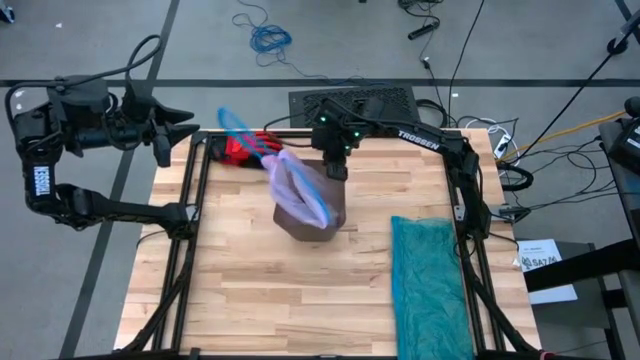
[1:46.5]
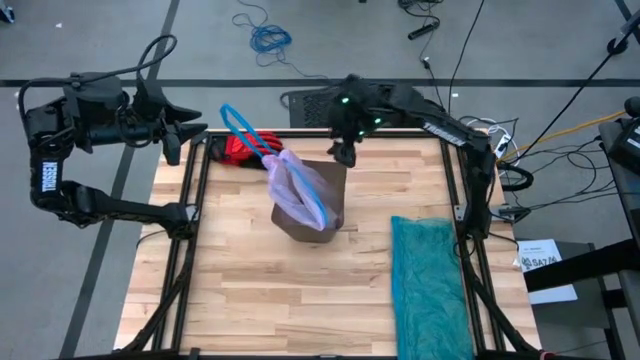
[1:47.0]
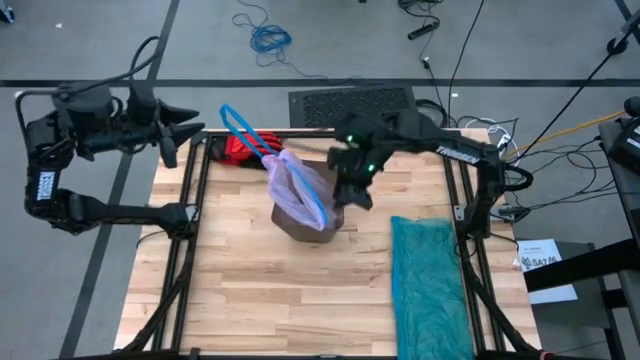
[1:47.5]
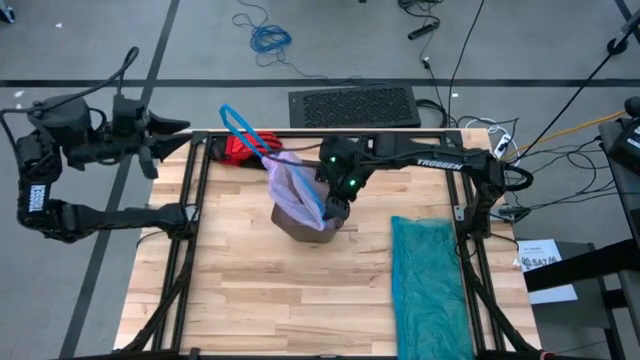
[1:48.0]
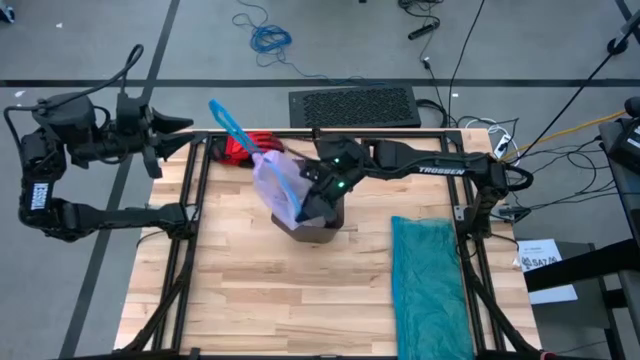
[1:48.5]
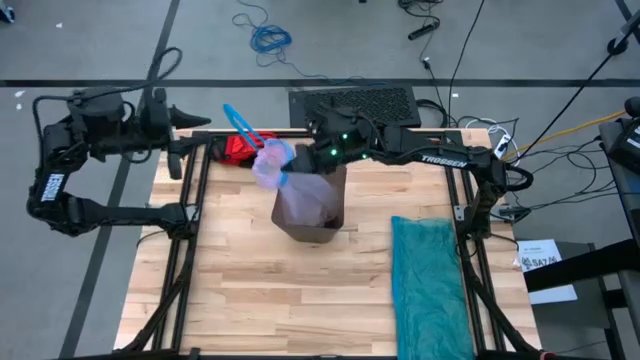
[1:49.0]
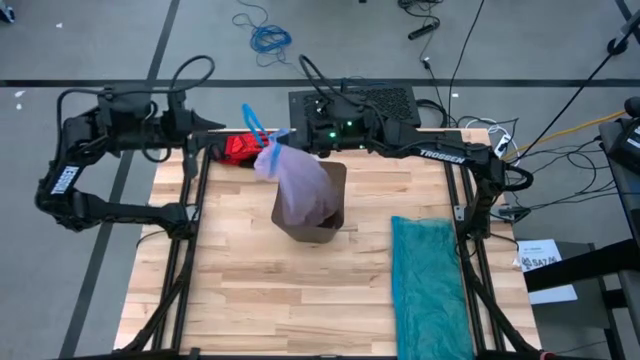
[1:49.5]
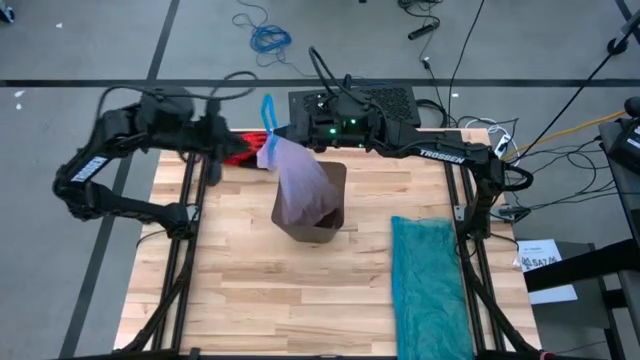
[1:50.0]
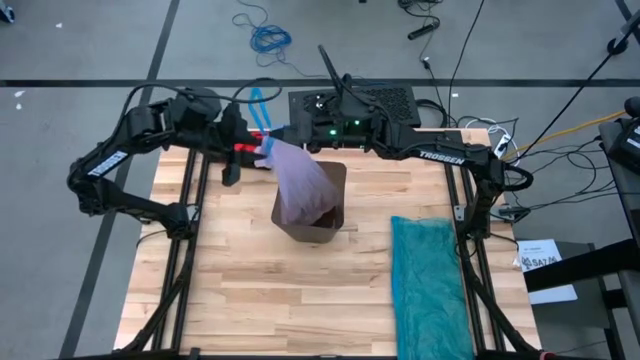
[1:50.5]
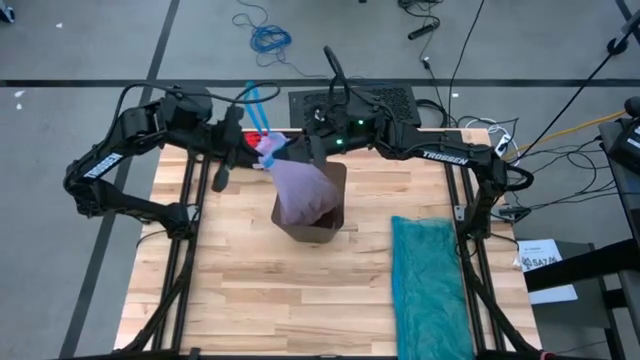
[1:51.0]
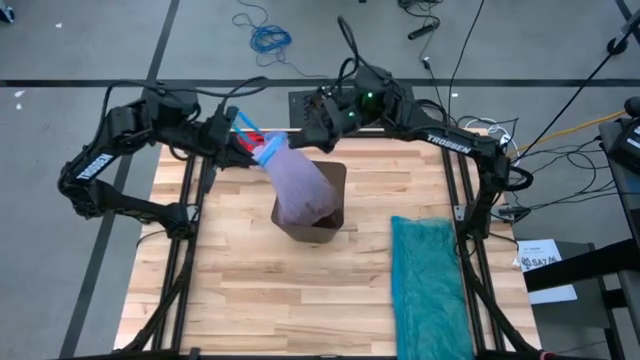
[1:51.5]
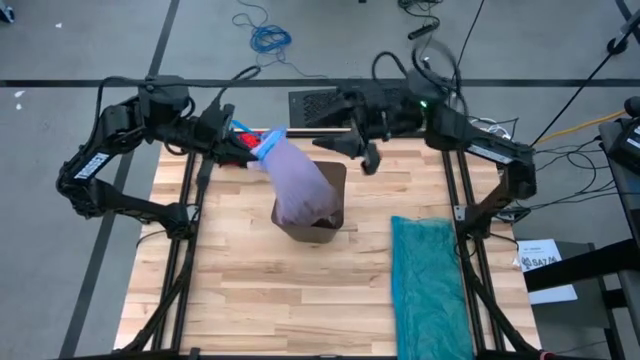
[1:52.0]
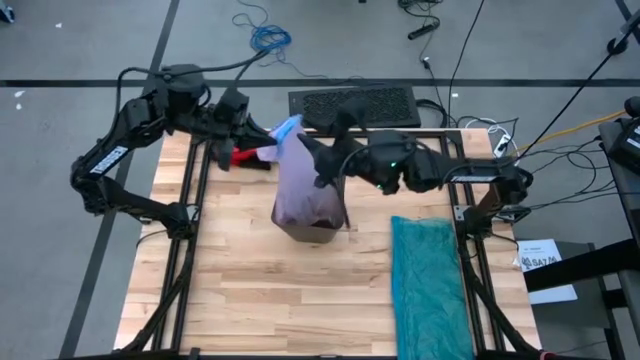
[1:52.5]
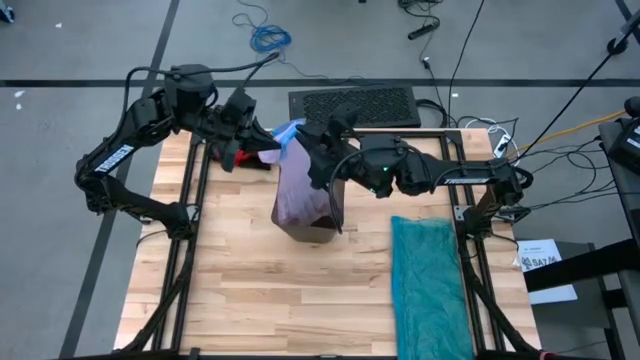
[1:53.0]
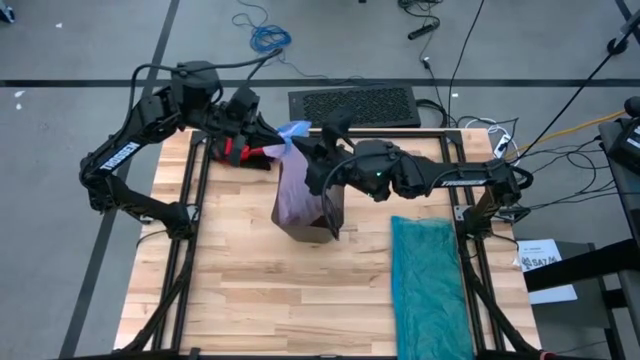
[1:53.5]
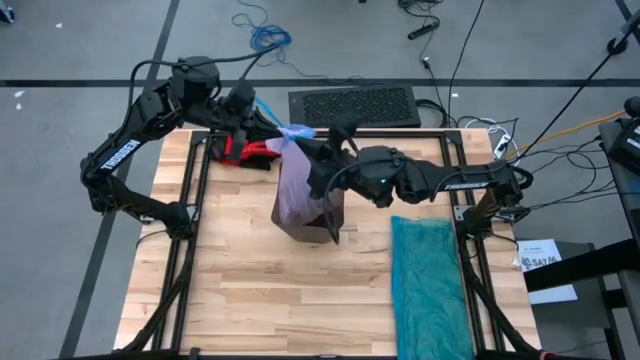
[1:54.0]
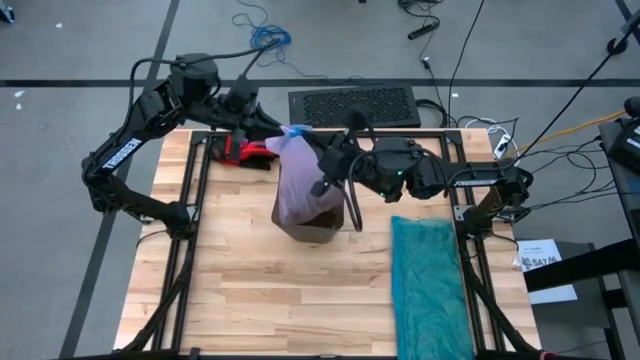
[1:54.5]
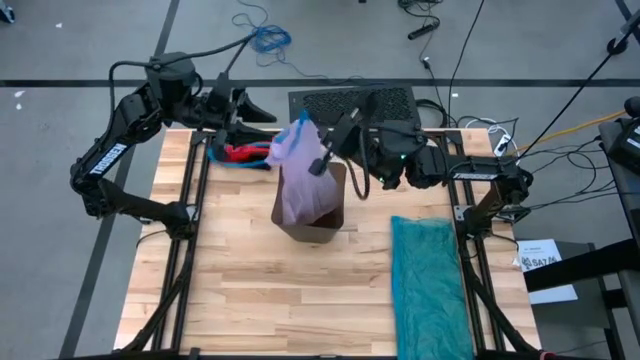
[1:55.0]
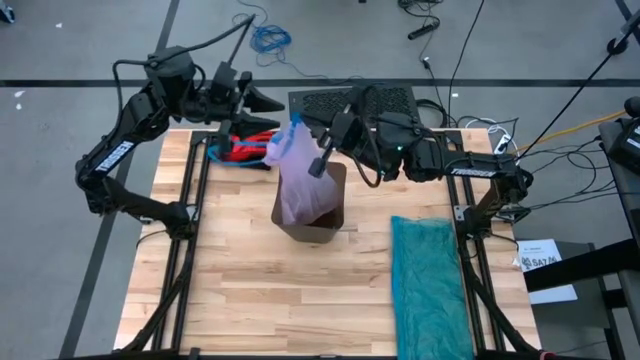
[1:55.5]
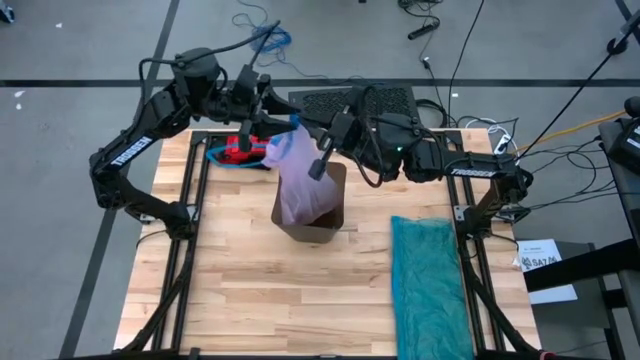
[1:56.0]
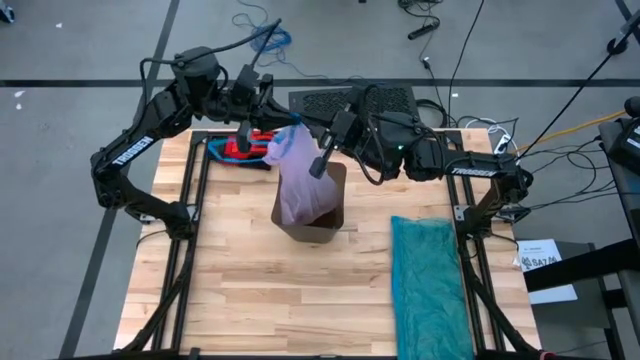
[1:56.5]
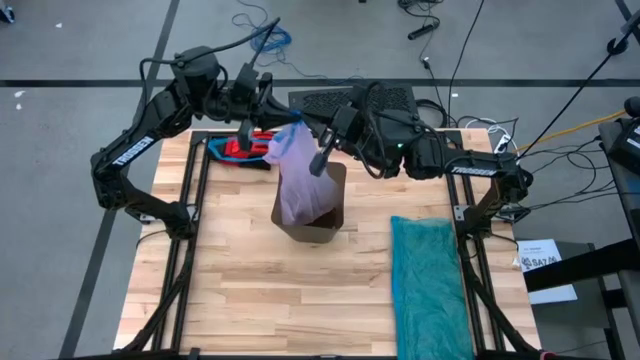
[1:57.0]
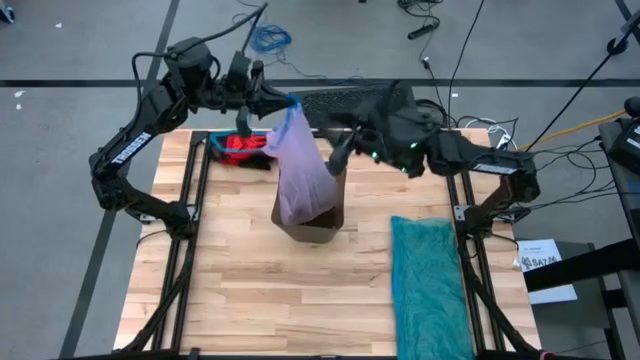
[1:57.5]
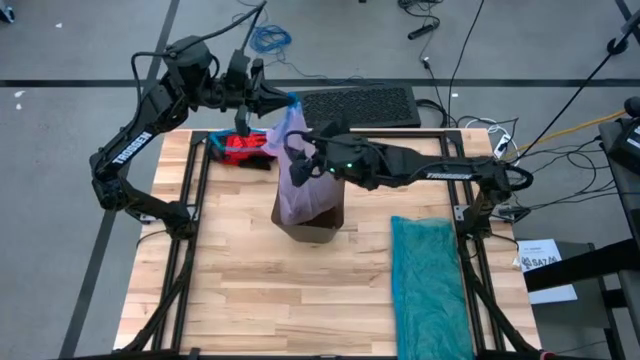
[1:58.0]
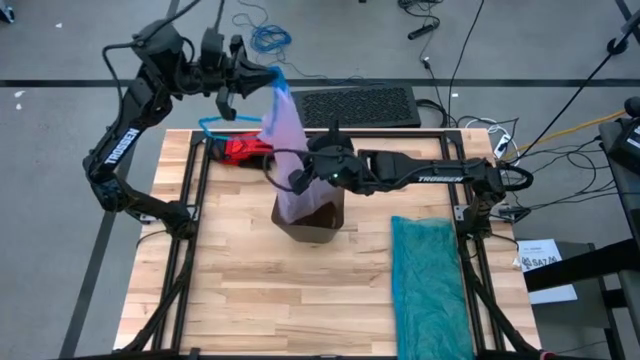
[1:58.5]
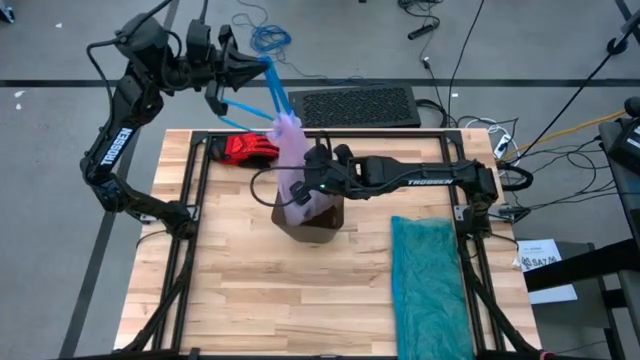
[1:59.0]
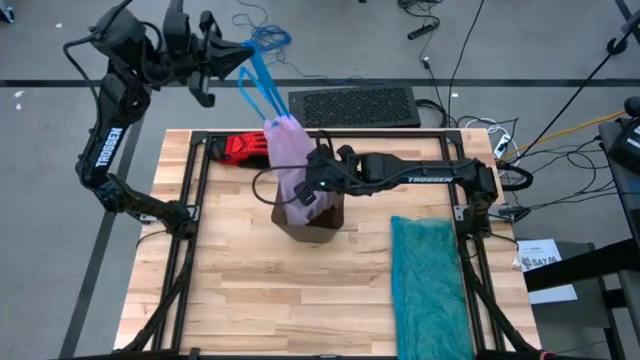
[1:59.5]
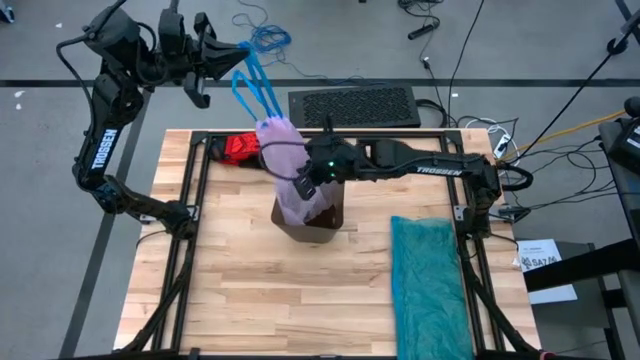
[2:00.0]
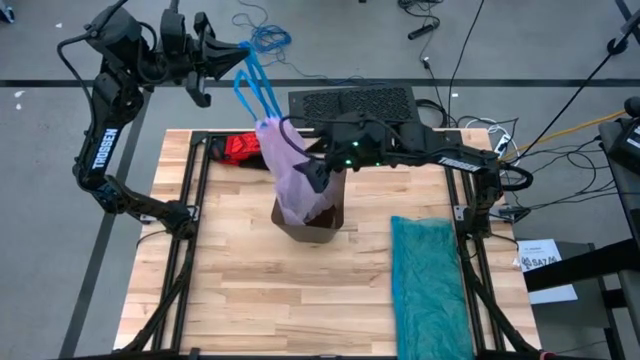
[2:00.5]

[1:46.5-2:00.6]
Task: place trash/remove bag and relplace
Close the pink trash bag inside the trash bin

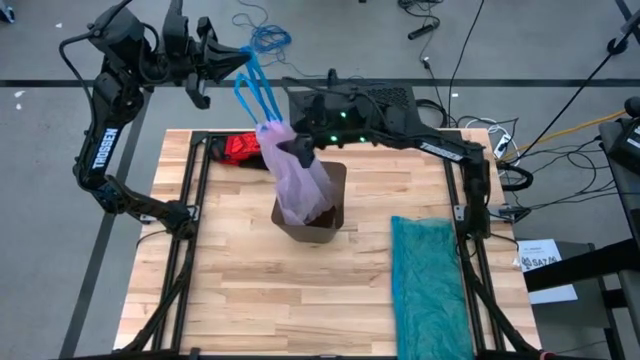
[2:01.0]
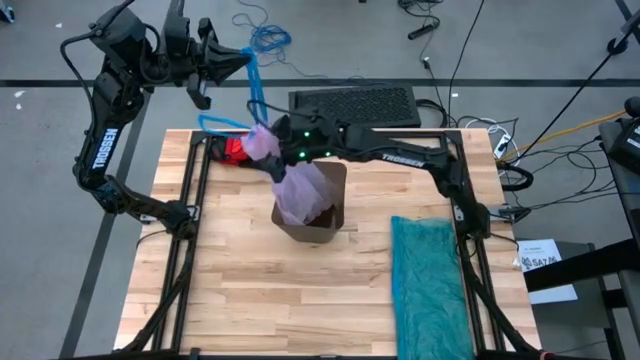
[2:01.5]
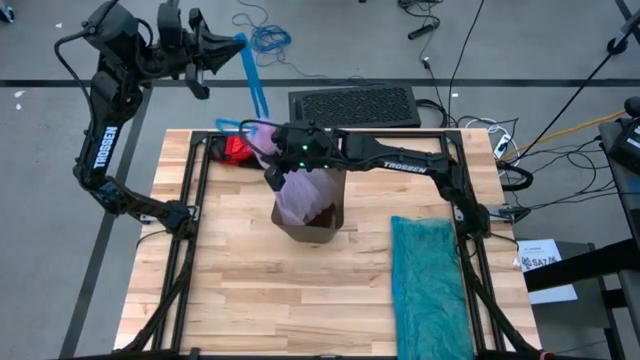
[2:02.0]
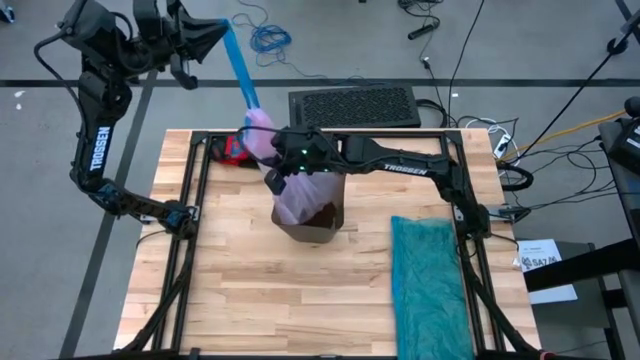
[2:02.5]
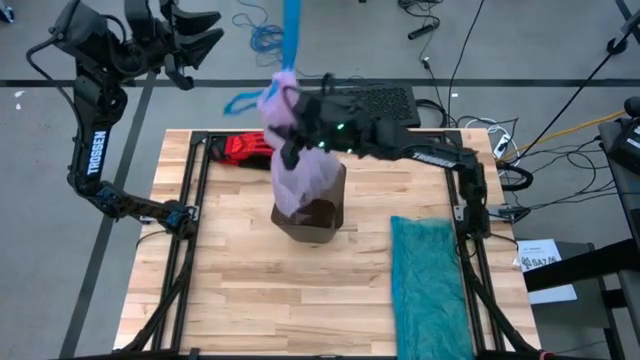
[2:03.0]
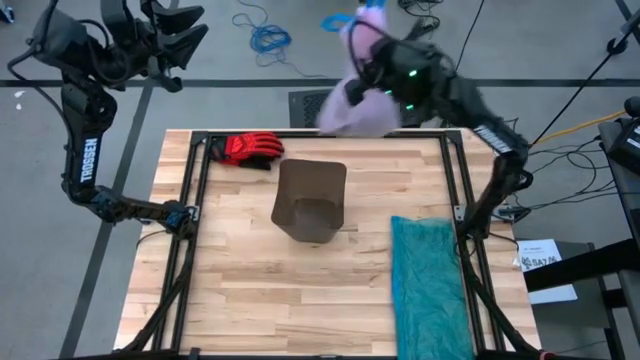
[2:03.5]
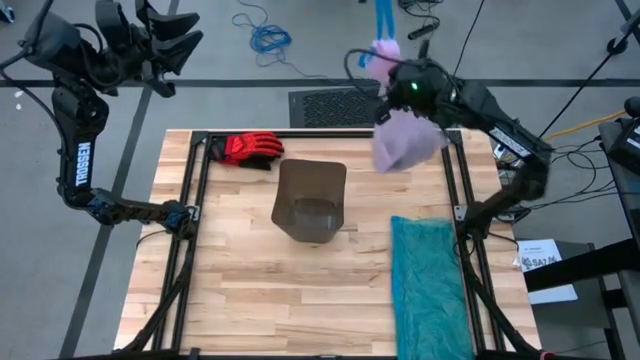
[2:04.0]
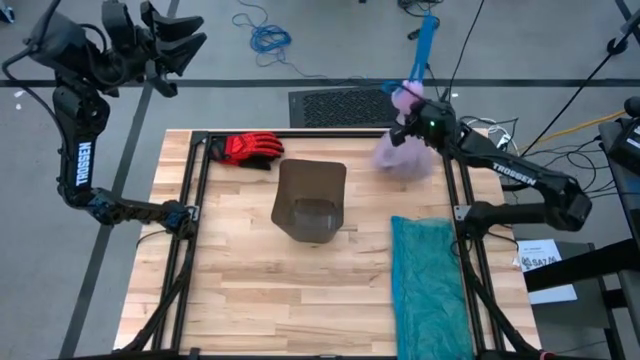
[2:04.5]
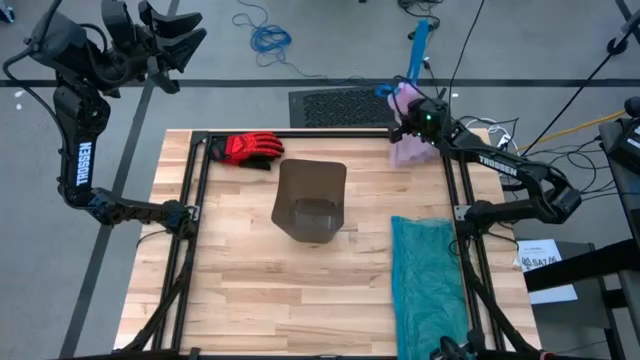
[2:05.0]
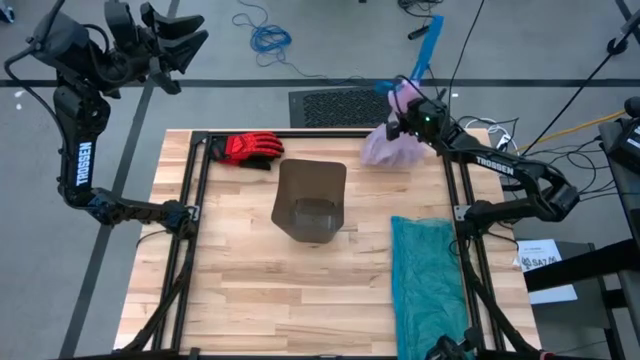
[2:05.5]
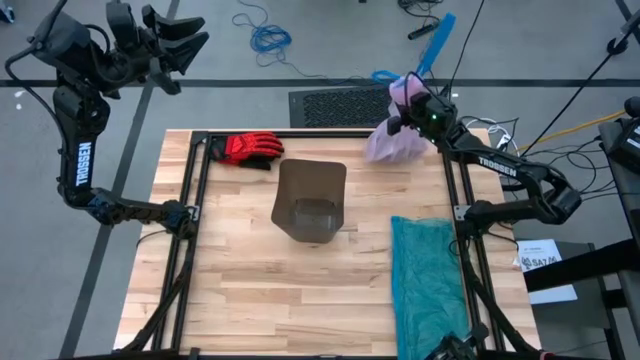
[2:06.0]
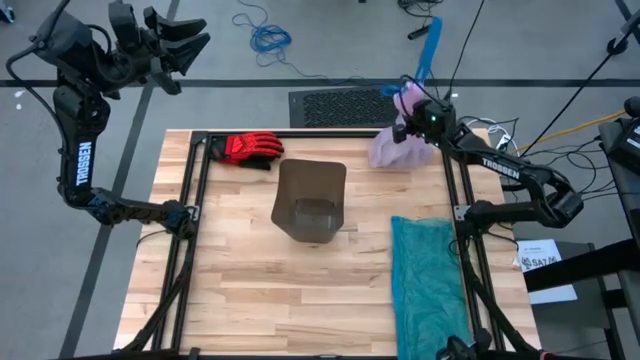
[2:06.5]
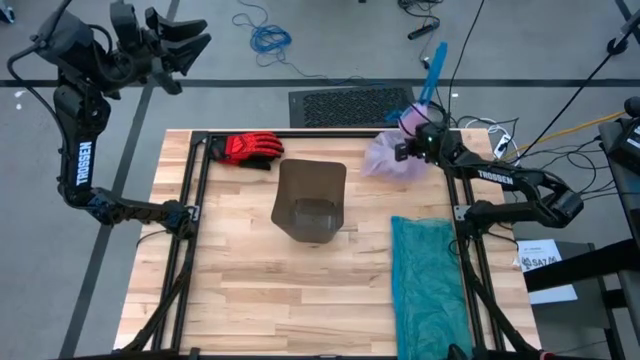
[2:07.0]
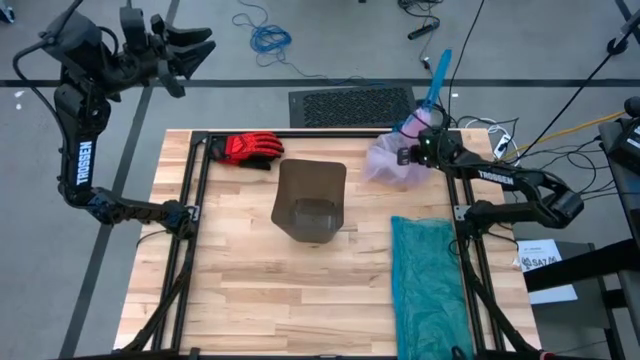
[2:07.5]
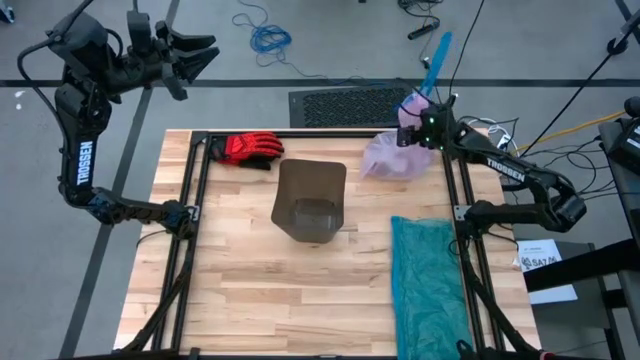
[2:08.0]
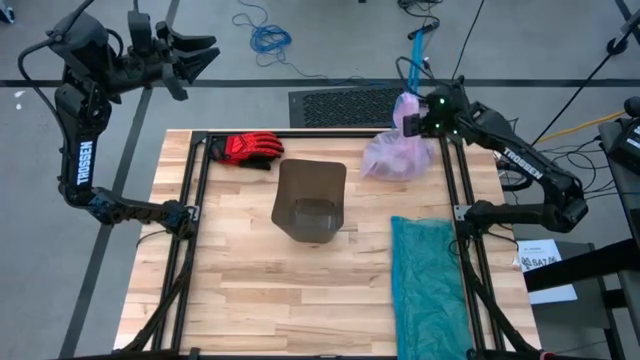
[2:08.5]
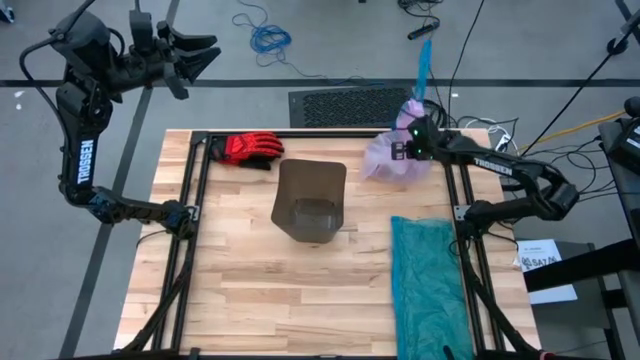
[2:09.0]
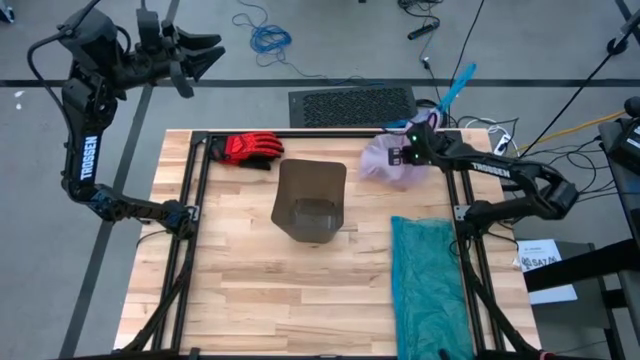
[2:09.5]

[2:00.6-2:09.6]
Remove the pink trash bag from the trash bin
